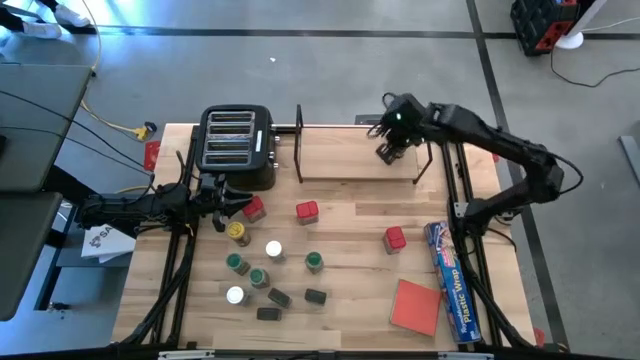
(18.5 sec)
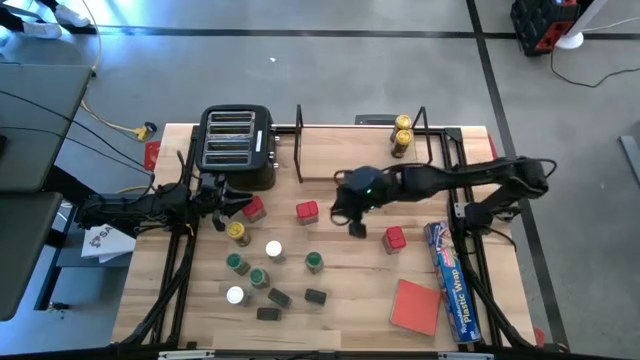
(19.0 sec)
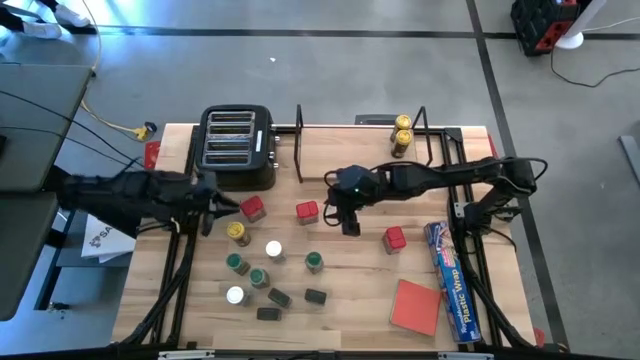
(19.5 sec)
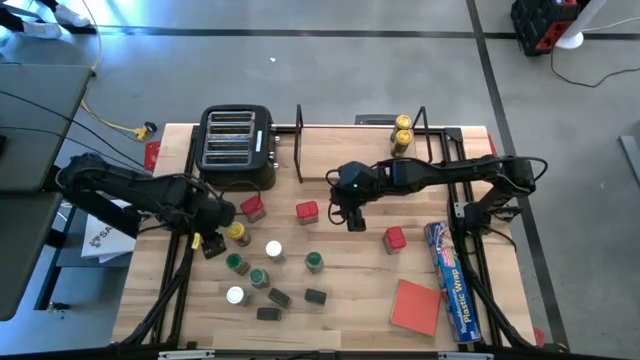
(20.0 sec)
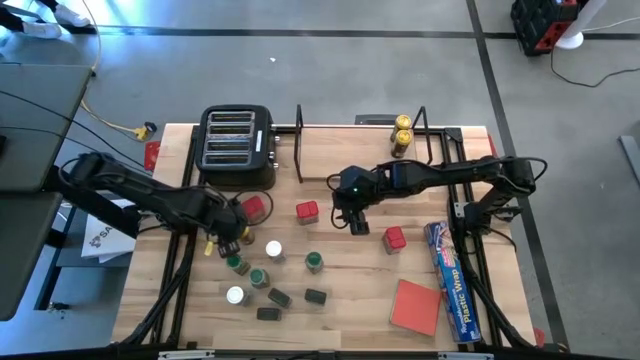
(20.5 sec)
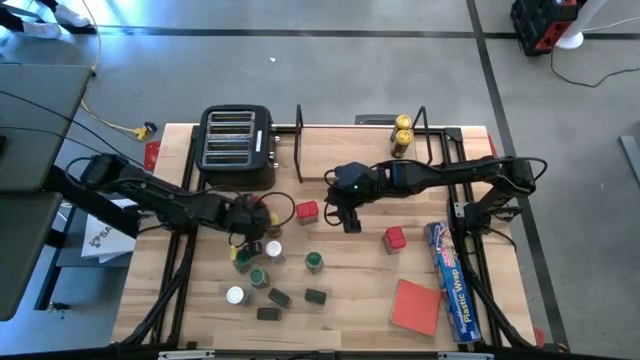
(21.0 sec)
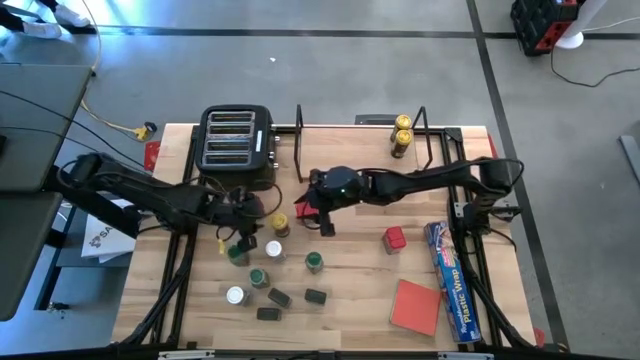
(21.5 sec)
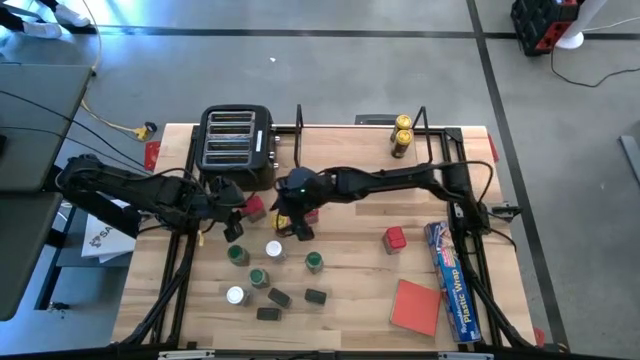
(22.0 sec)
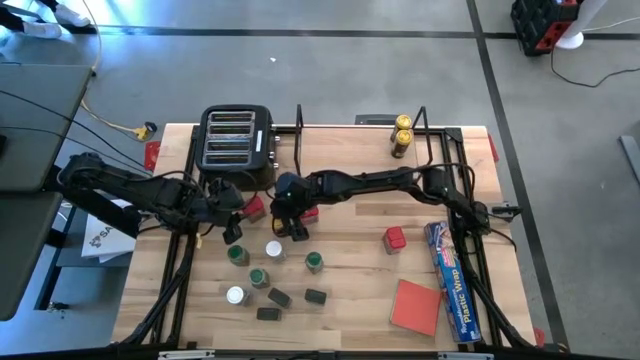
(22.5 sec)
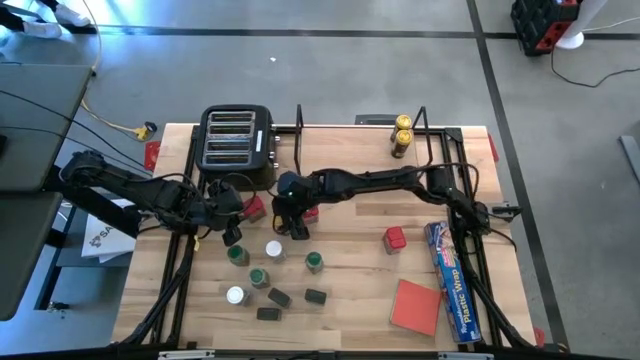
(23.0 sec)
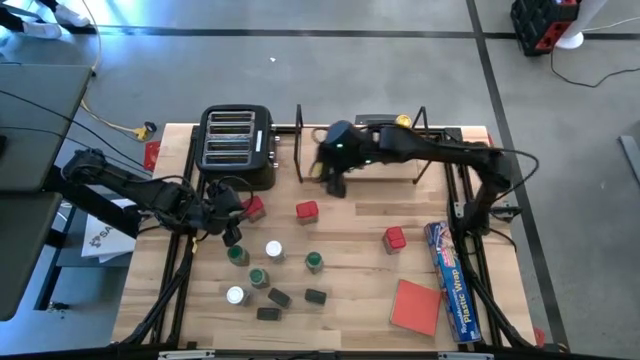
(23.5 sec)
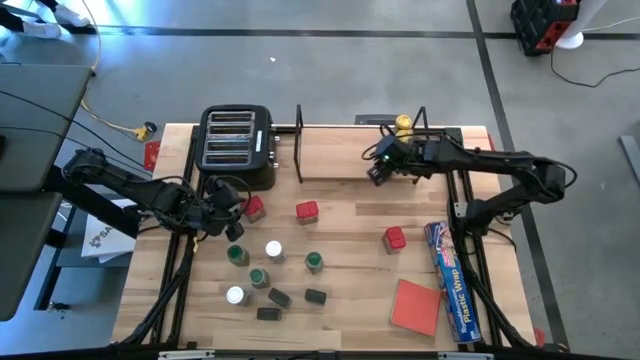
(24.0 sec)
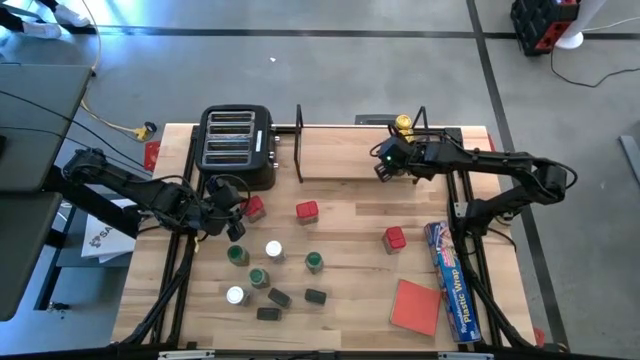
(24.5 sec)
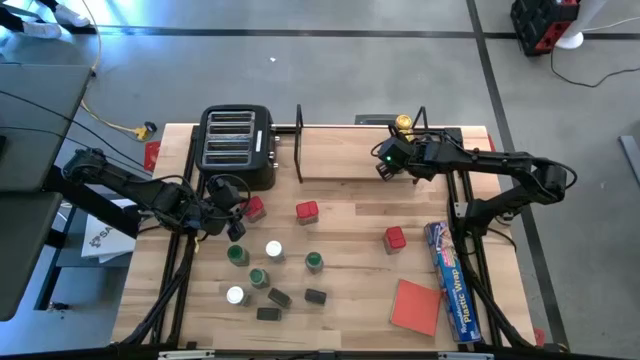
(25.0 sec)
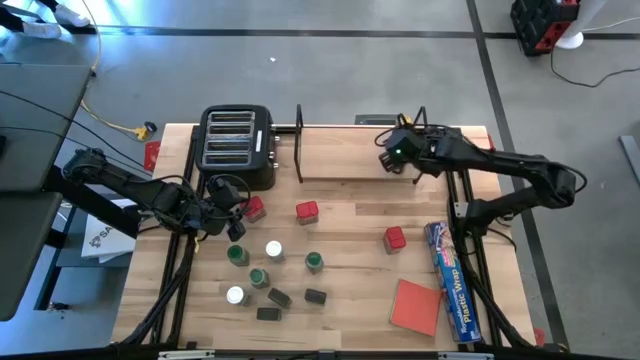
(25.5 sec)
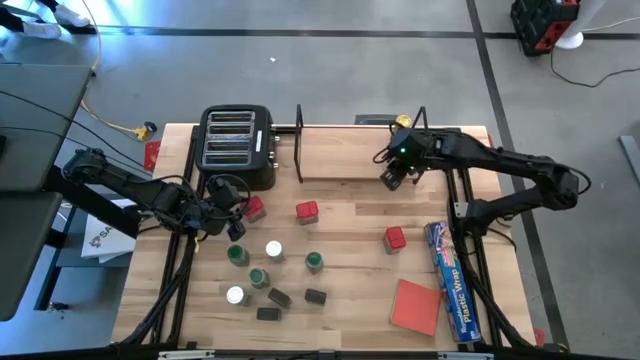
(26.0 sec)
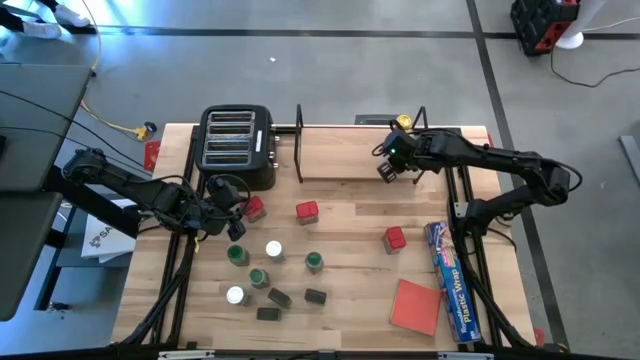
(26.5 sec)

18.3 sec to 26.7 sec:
Task: Shelf spices
Put the yellow seasoning bottle on the shelf aligned with the other yellow seasoning bottles

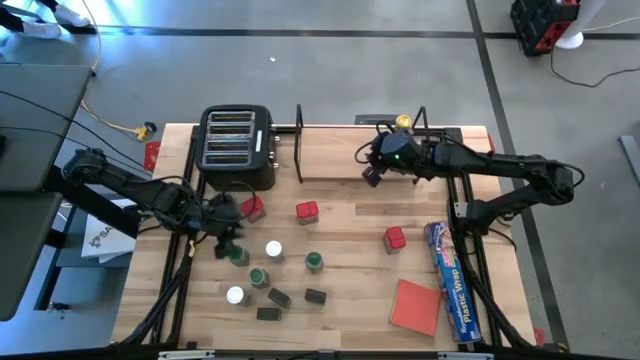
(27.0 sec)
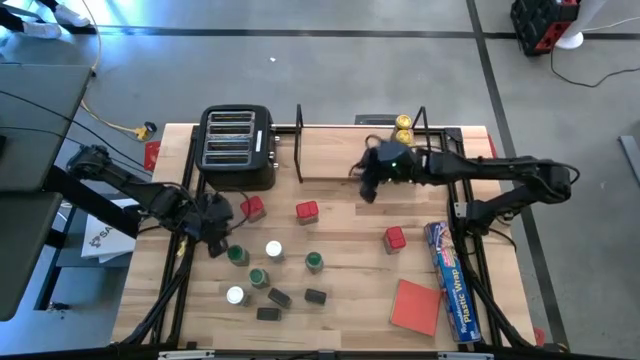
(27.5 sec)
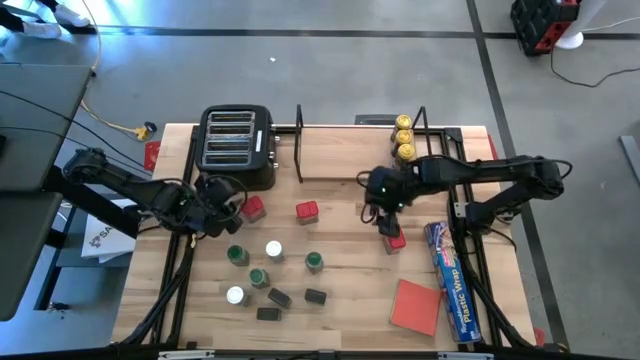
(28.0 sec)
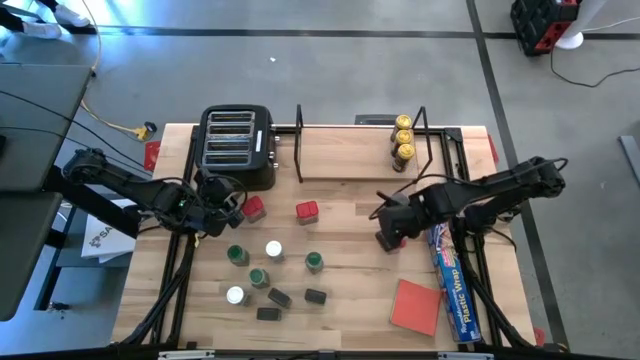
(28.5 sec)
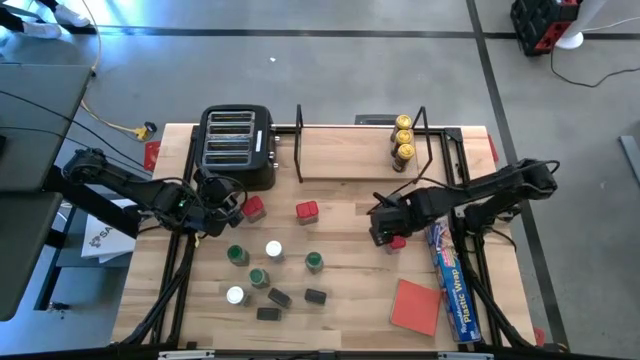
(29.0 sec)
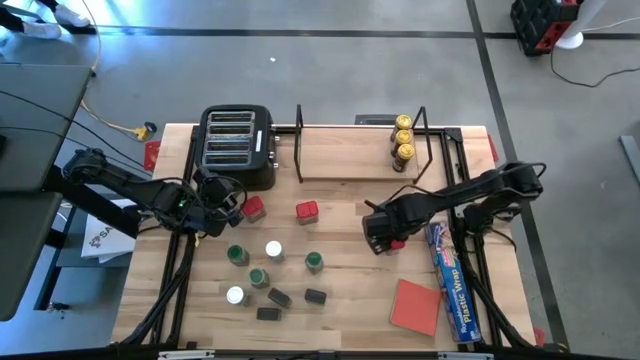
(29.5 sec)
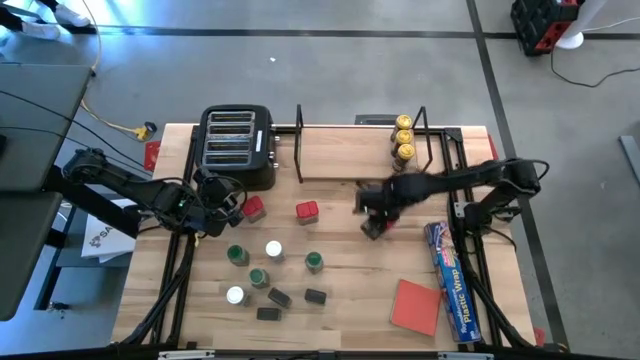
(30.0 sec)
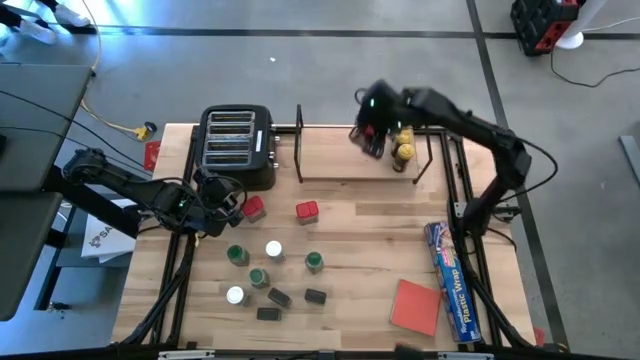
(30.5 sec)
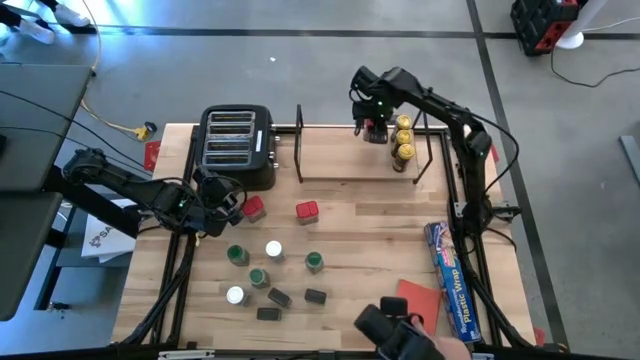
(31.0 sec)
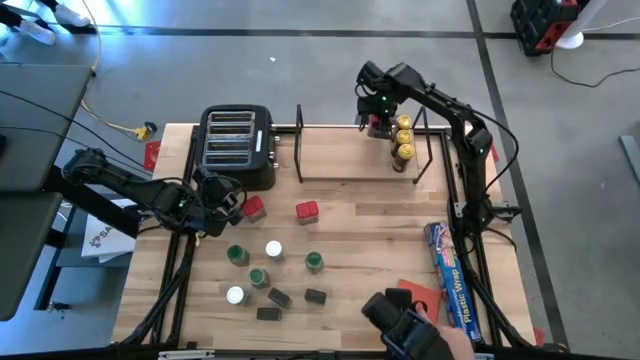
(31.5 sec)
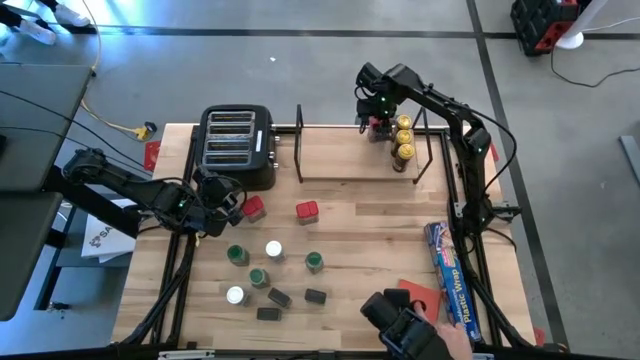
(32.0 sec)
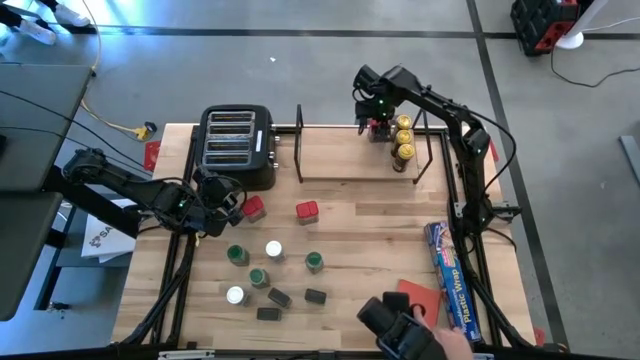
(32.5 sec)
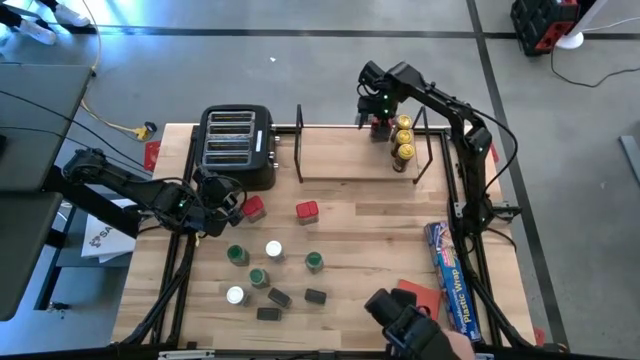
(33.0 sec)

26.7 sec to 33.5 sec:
Put the bottom red seasoning can on the shelf

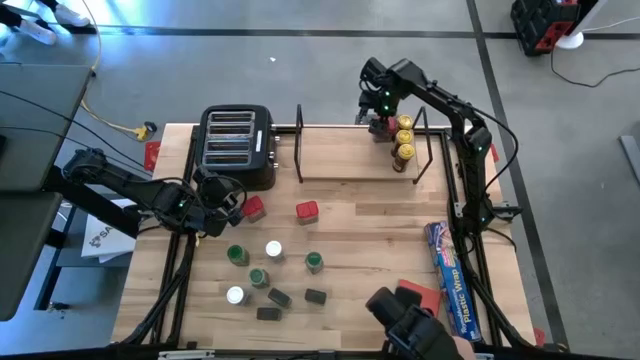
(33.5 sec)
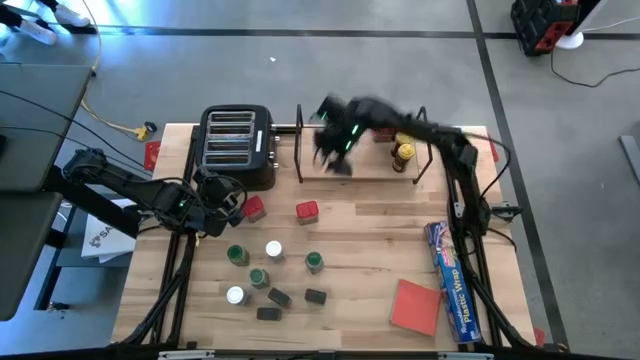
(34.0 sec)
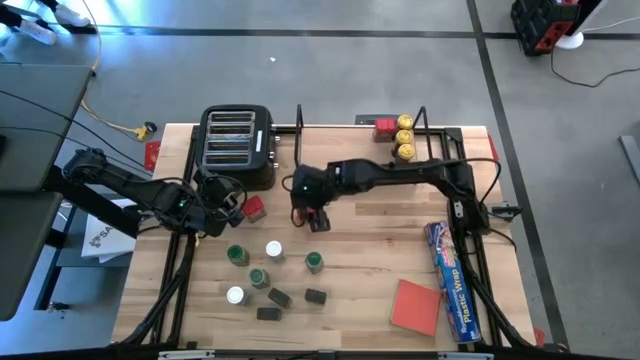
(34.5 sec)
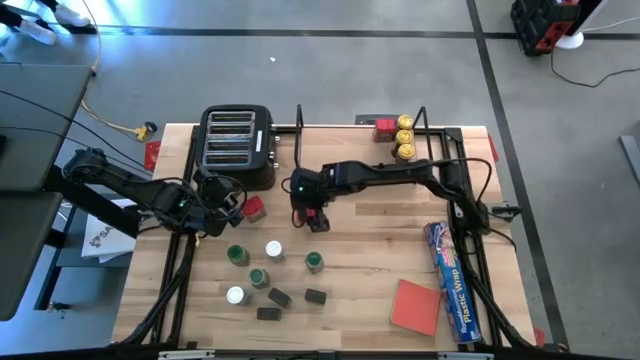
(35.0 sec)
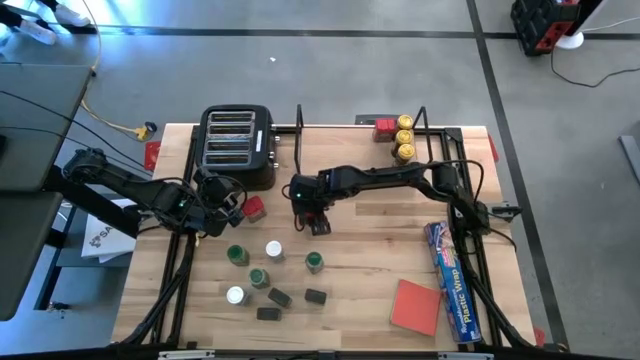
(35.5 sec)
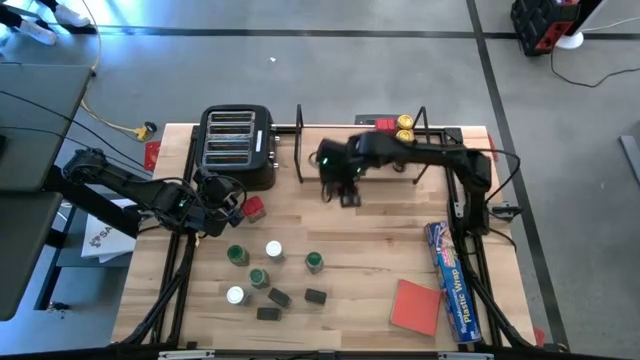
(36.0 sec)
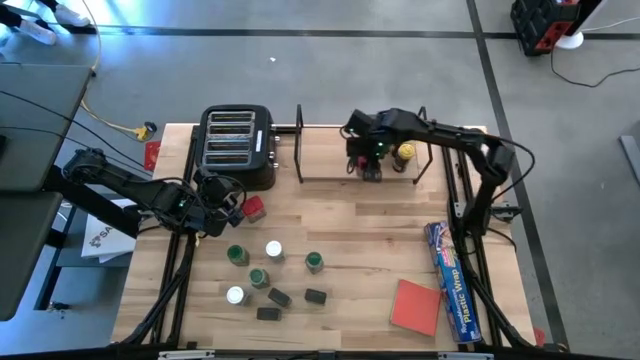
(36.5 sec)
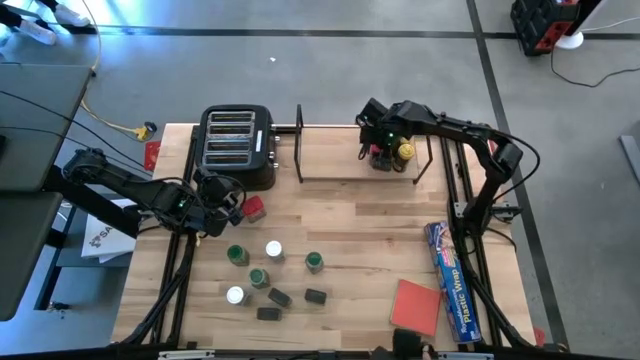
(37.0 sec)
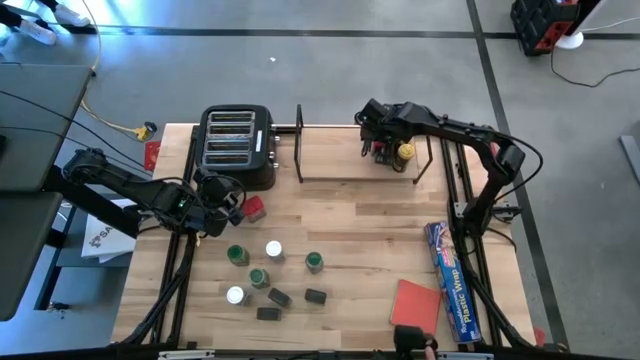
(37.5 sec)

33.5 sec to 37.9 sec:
Put the right red seasoning can on the shelf aligned with the other red seasoning can
